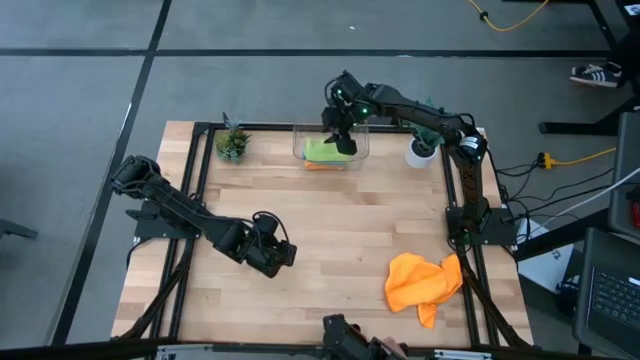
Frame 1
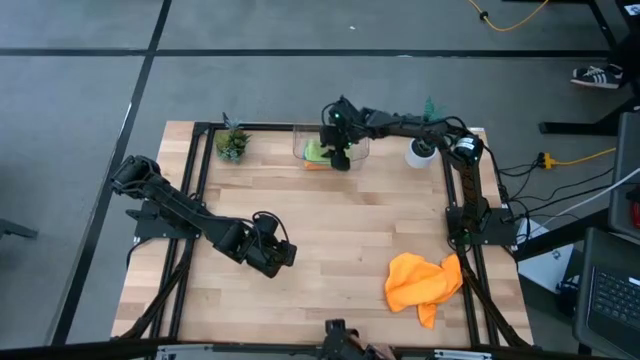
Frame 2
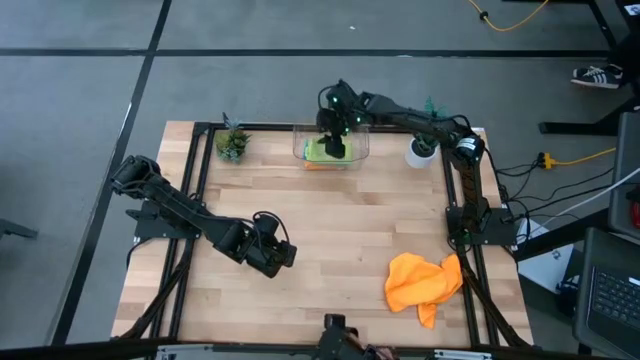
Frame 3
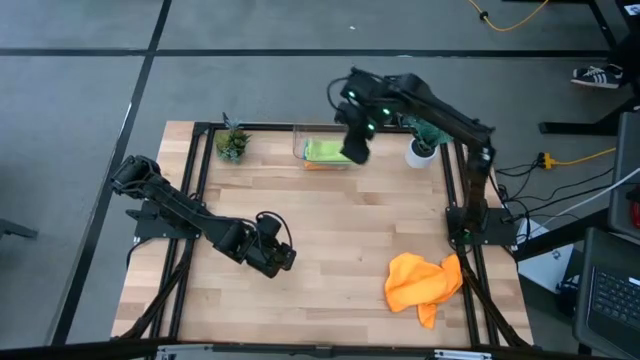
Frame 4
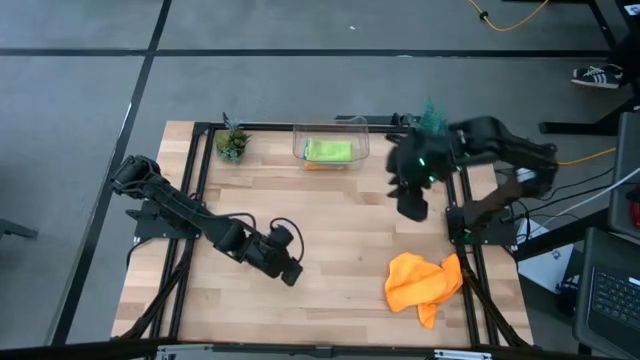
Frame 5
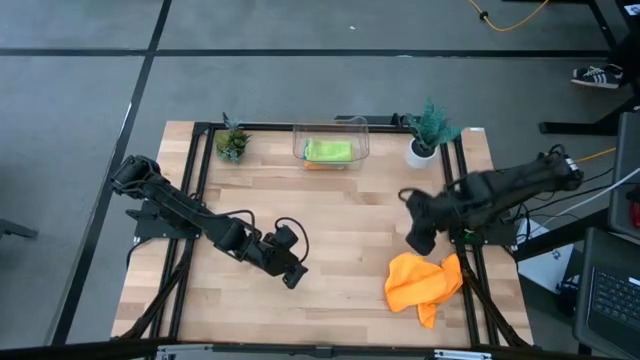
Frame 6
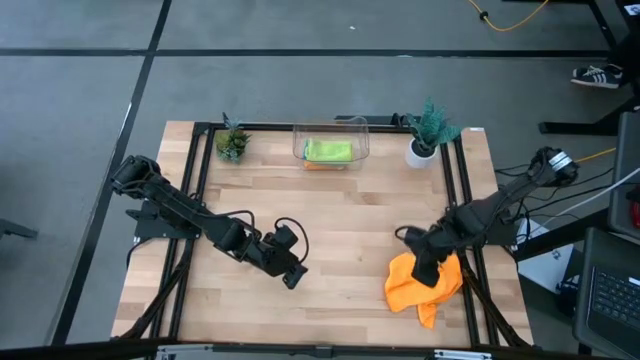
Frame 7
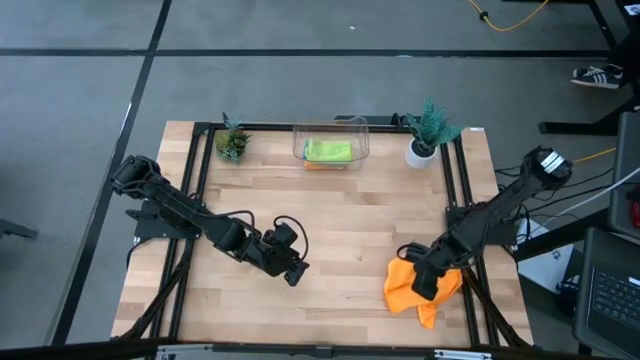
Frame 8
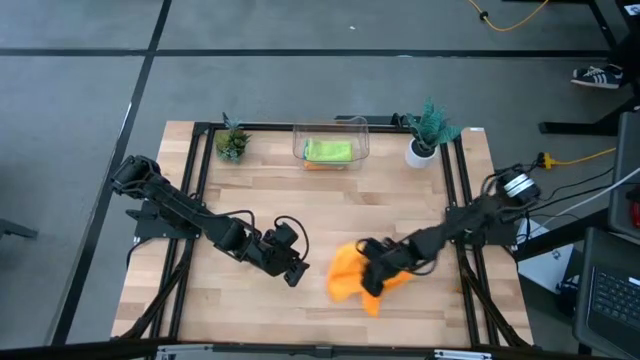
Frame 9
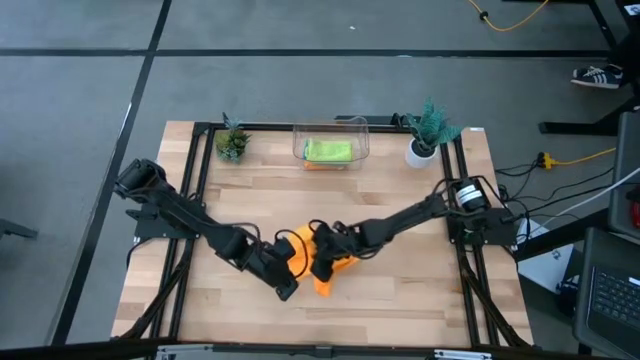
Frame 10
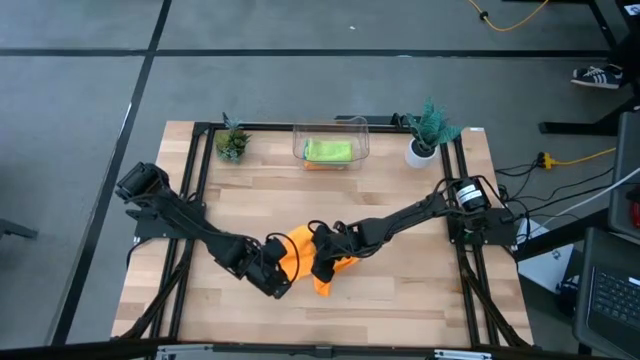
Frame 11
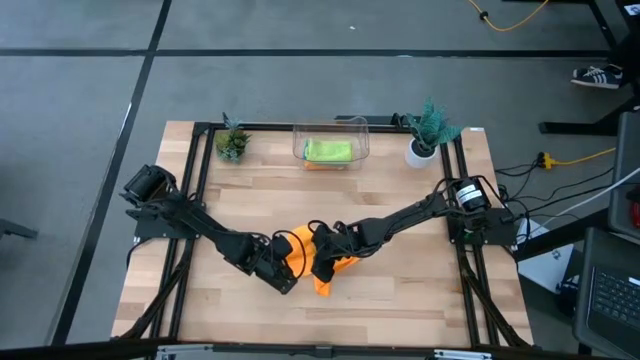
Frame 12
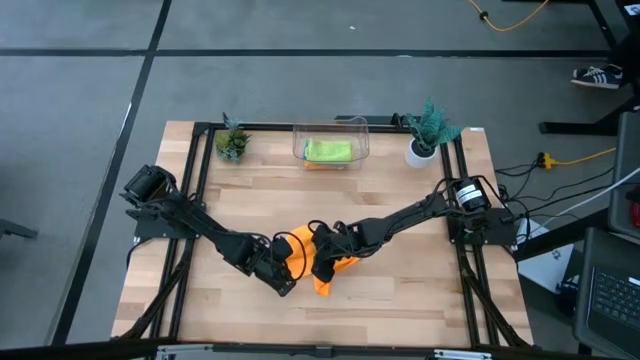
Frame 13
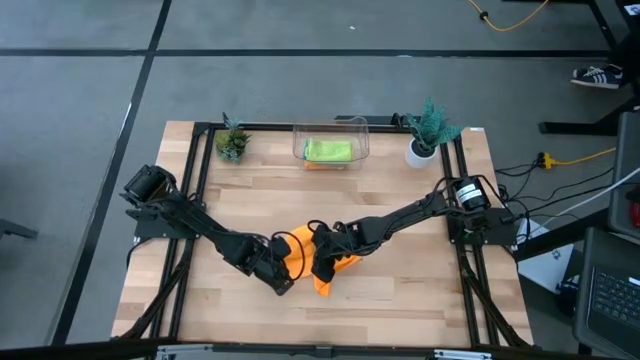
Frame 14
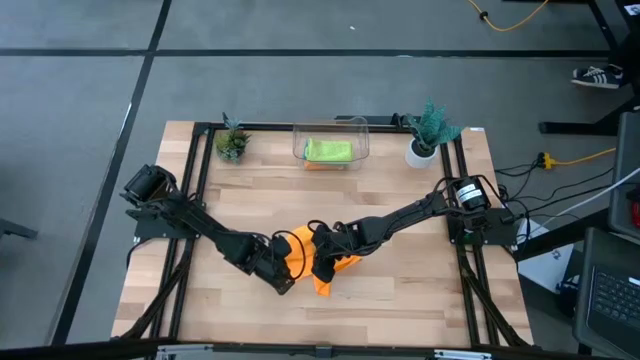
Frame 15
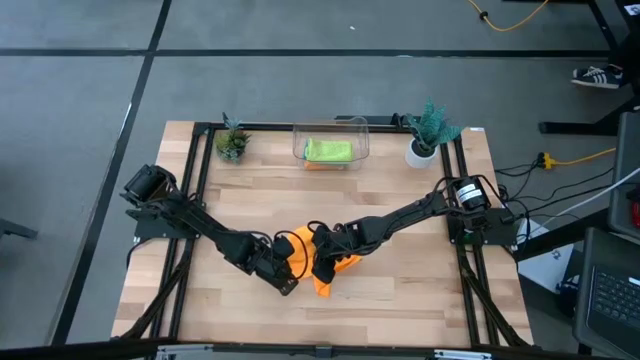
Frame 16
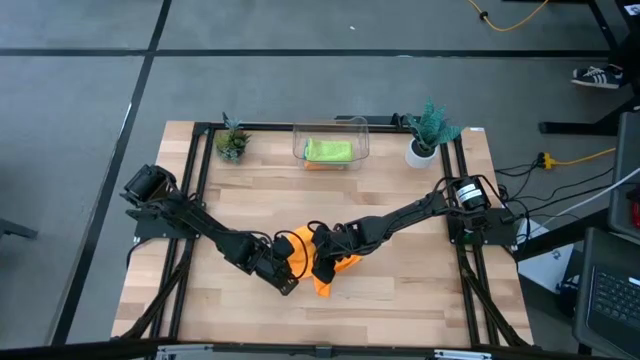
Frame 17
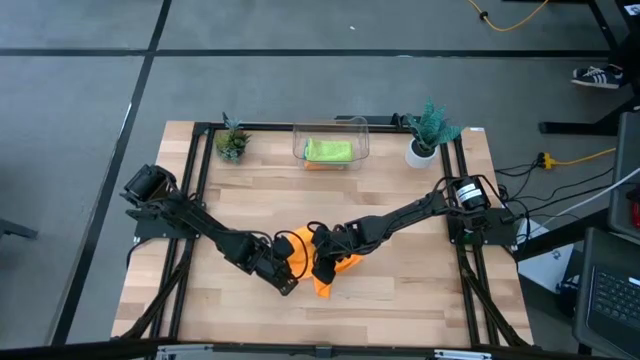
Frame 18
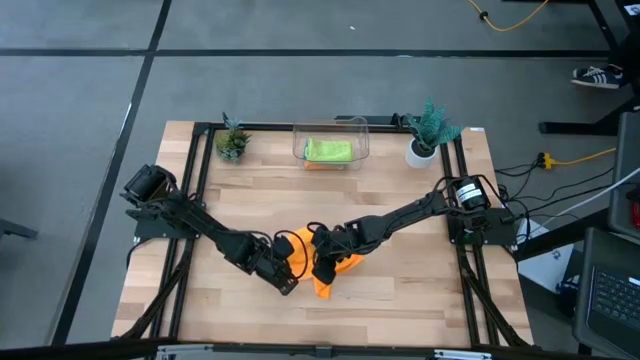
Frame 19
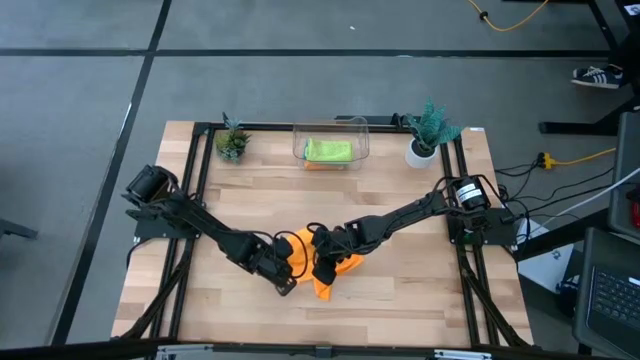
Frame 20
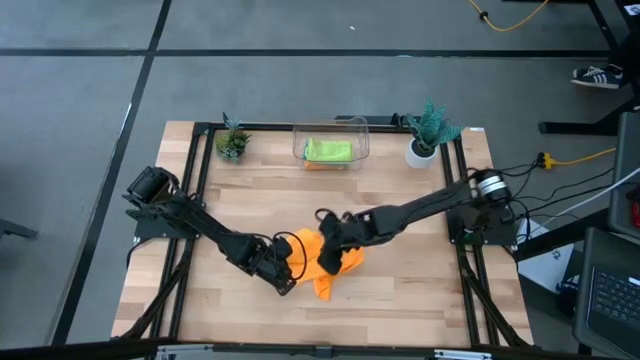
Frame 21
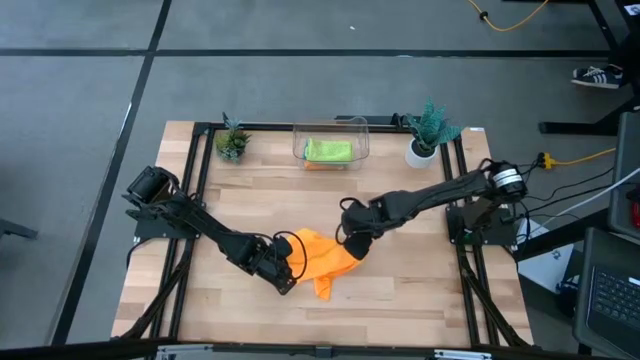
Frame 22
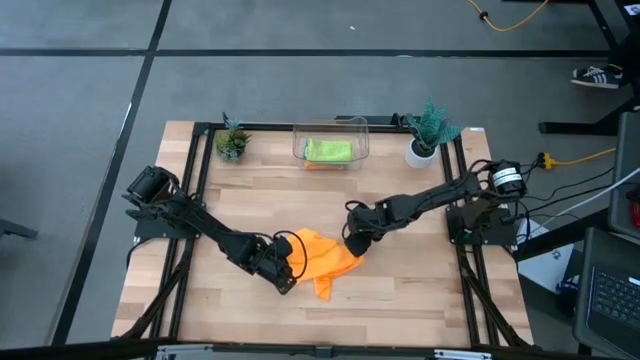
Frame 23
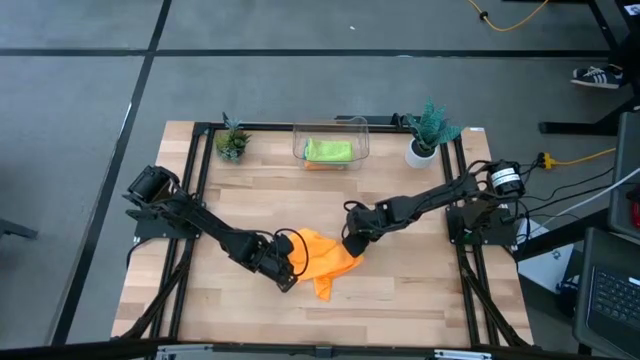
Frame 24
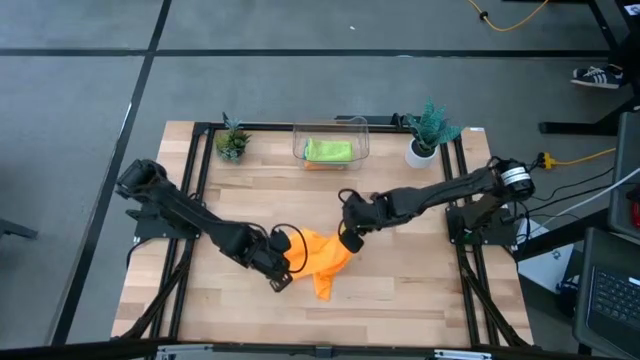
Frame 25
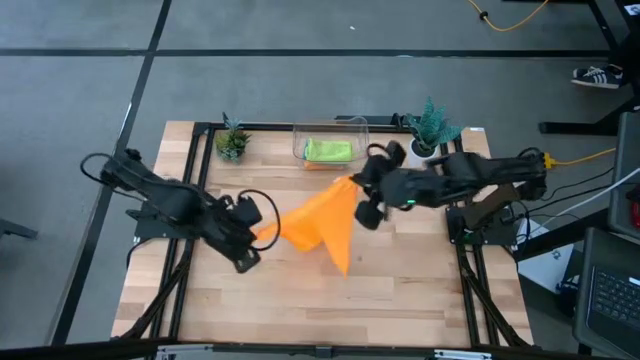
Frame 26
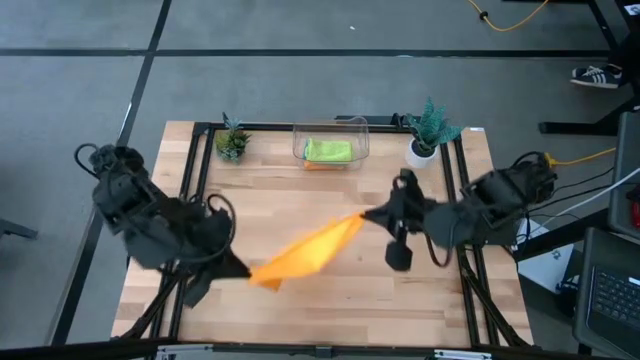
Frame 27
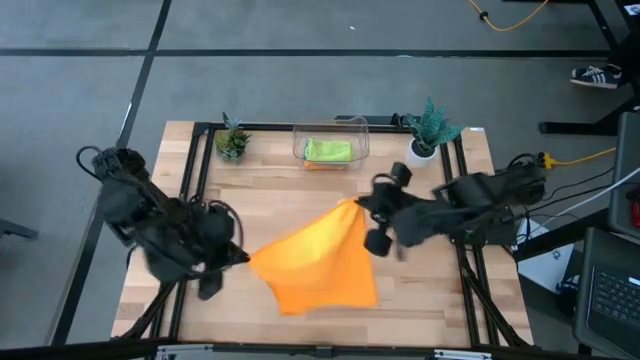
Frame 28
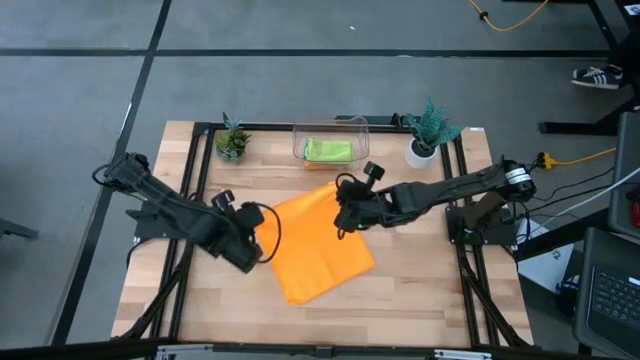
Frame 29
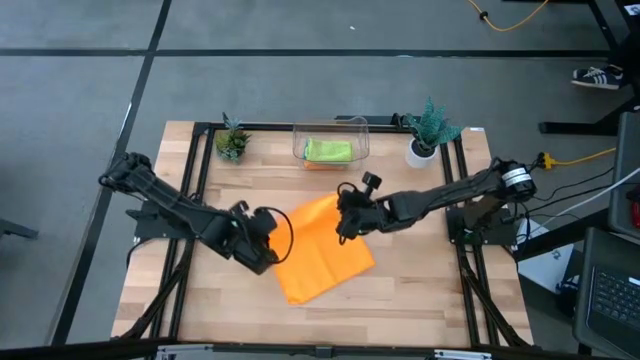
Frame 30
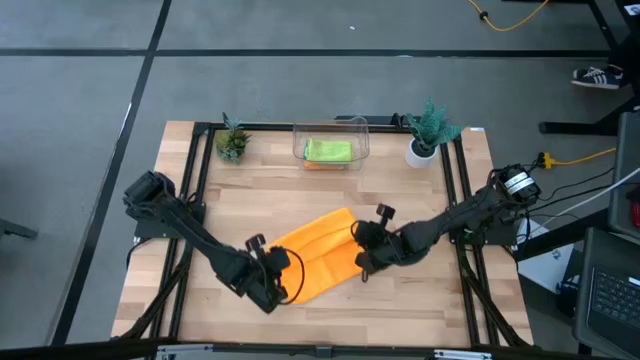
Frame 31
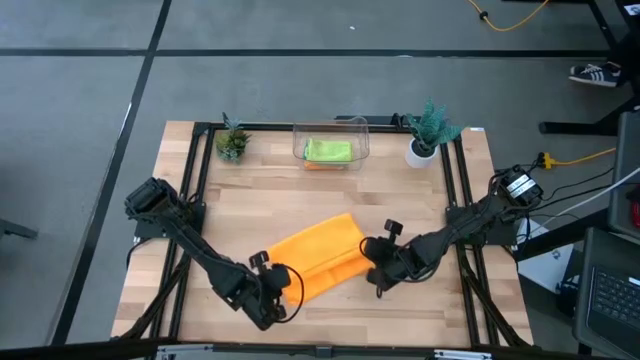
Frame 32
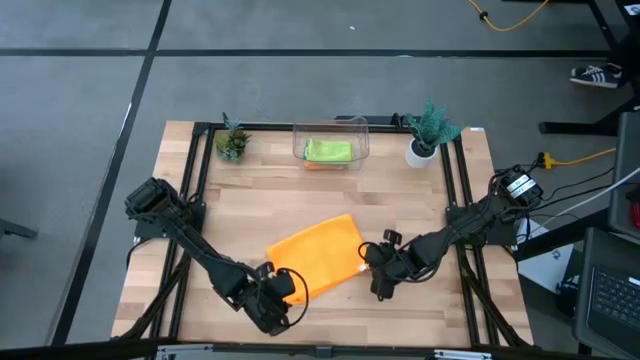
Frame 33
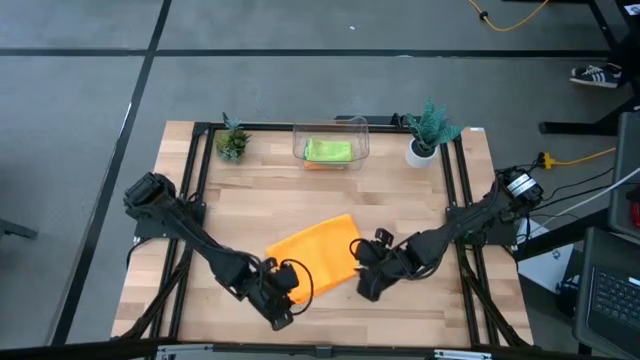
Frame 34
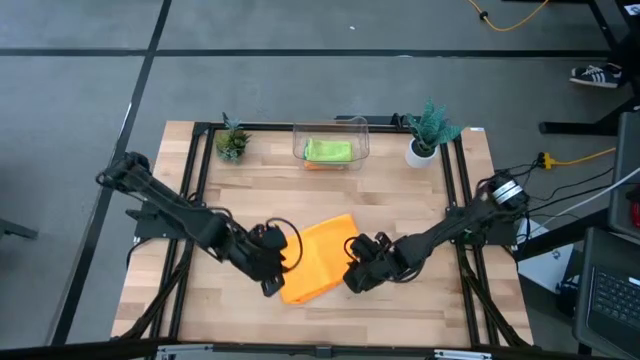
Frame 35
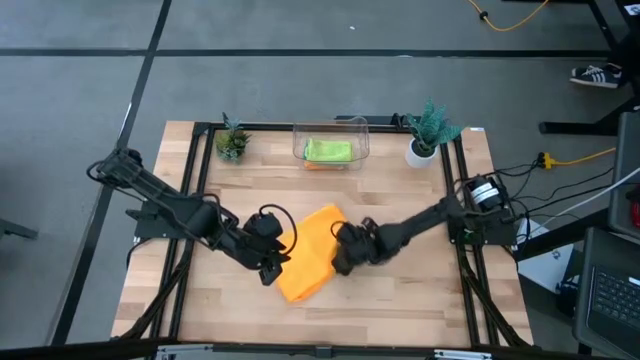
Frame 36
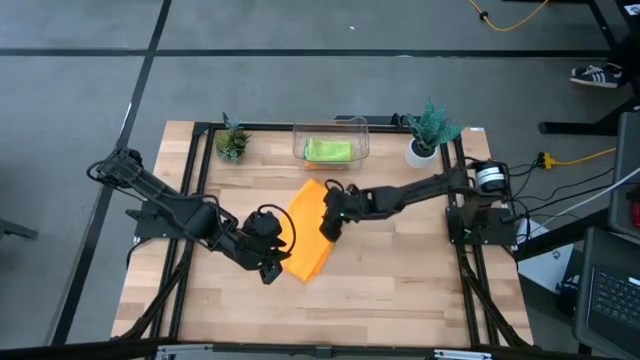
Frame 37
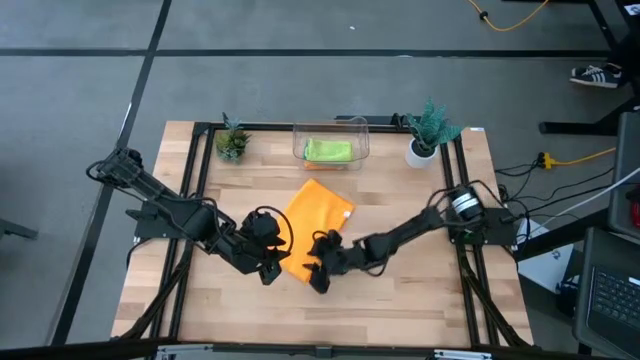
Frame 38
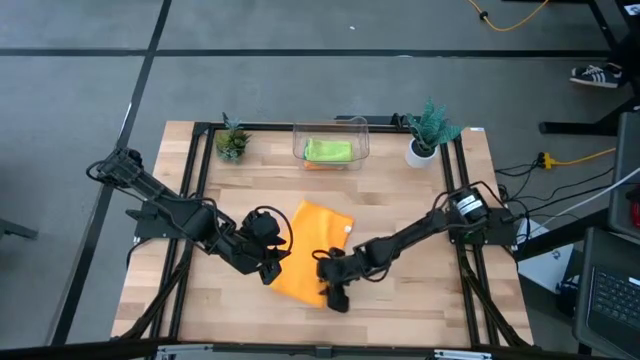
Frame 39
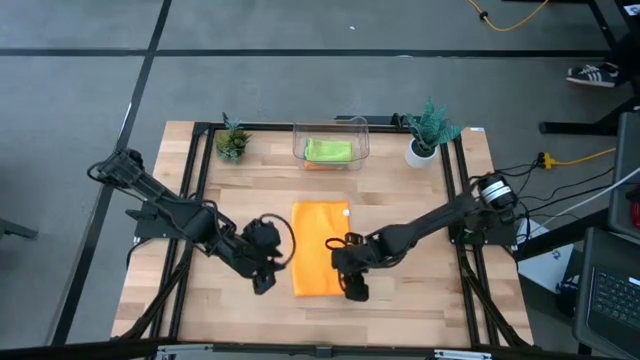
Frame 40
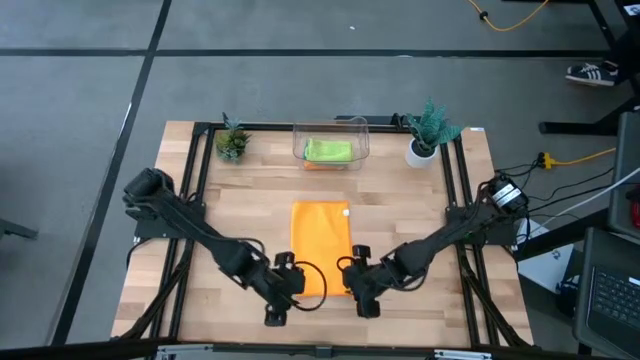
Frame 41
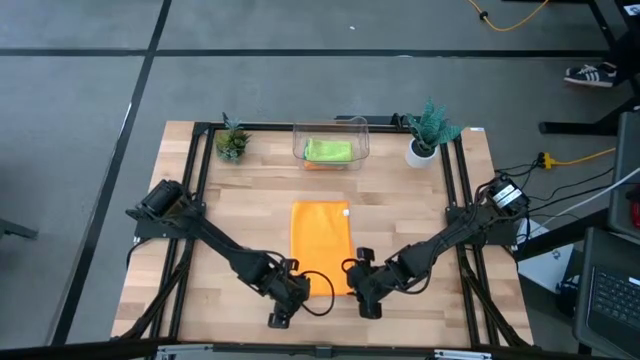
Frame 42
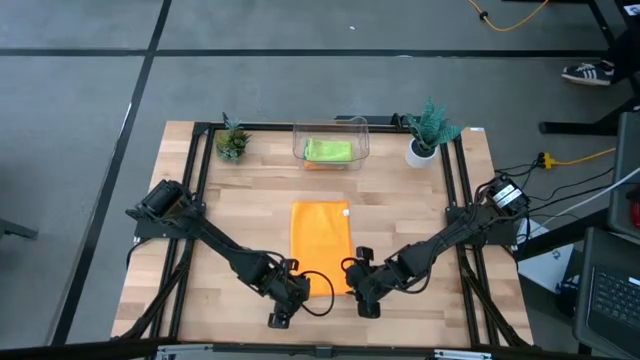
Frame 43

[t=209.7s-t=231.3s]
Task: Fold microfiber towels
Fold the orange towel
